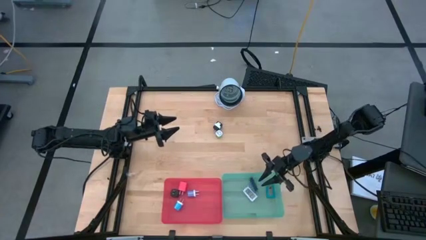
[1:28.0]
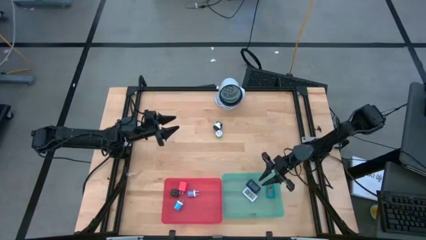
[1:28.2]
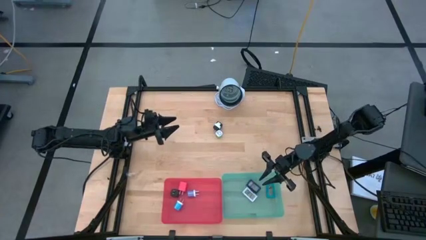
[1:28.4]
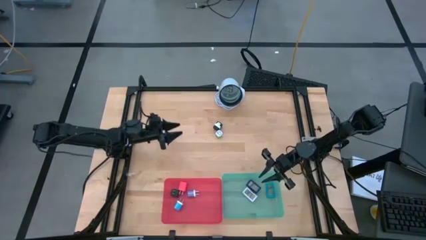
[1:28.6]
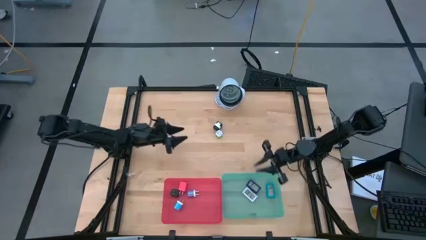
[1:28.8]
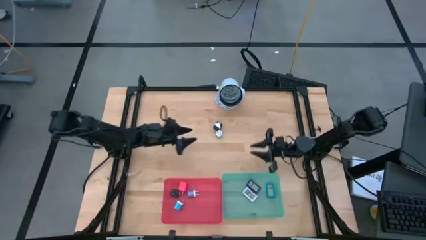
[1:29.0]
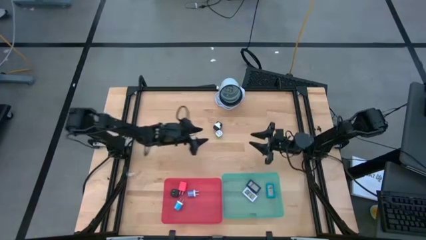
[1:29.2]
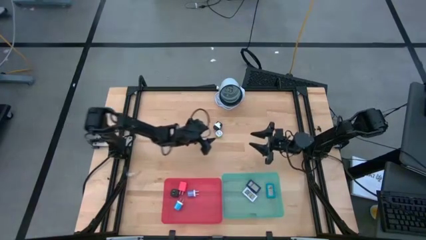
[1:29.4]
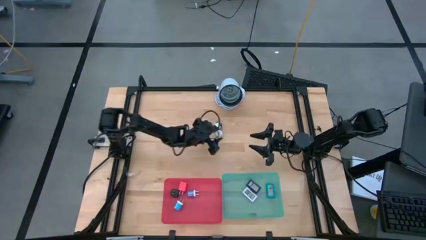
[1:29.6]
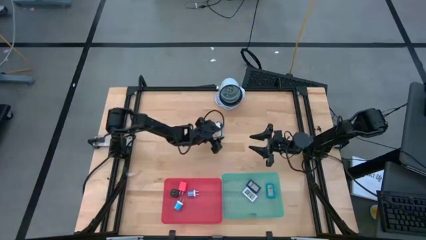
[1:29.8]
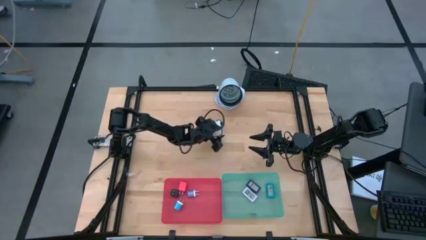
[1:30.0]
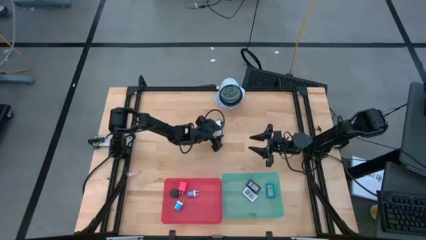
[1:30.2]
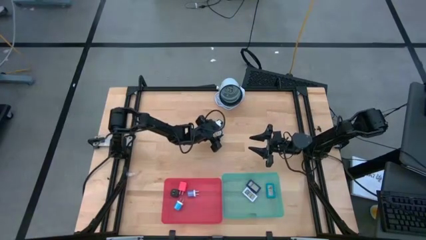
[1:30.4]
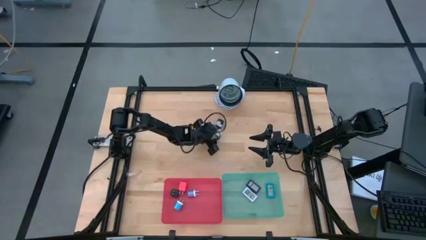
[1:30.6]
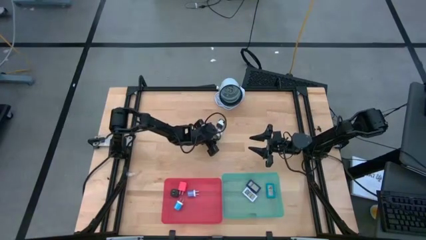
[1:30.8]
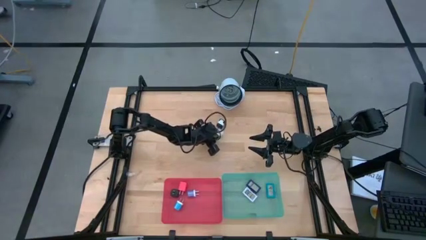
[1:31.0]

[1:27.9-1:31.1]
Task: Pick & Place Office items
Put the green charger adapter into the red bin

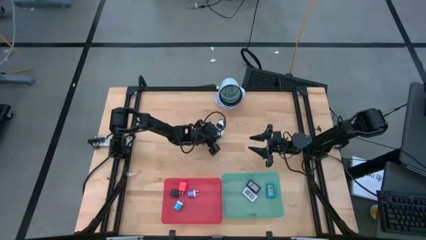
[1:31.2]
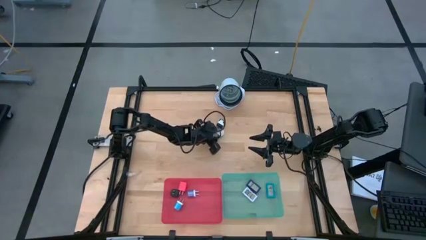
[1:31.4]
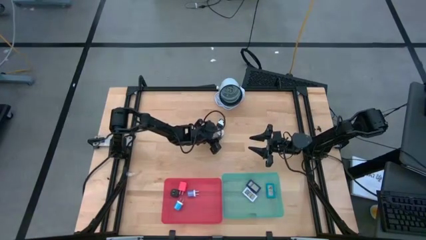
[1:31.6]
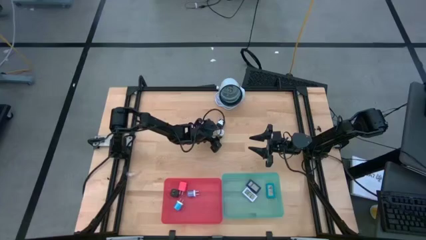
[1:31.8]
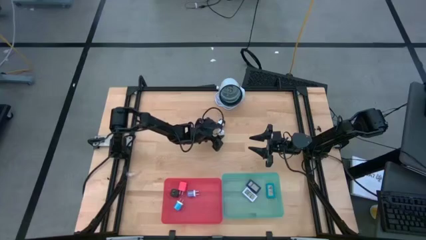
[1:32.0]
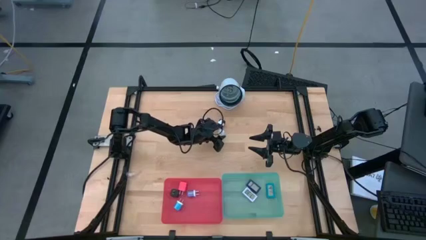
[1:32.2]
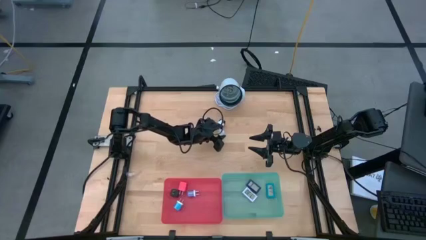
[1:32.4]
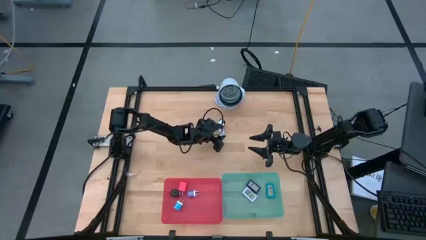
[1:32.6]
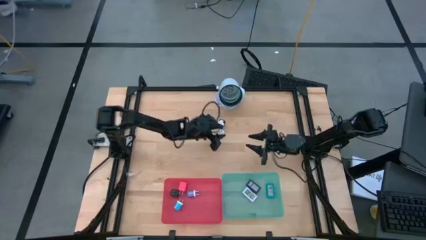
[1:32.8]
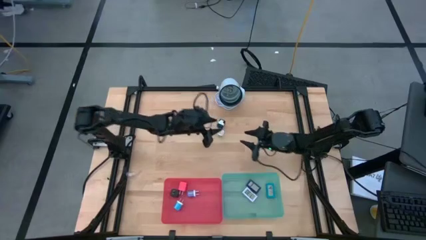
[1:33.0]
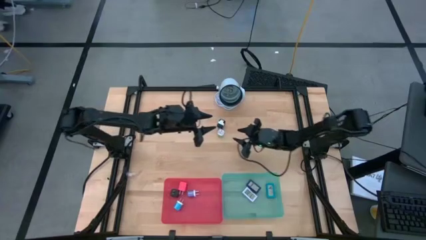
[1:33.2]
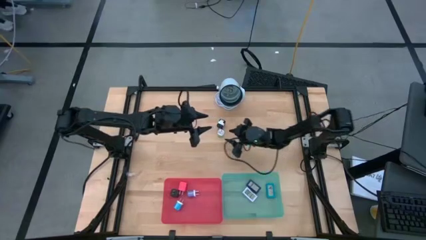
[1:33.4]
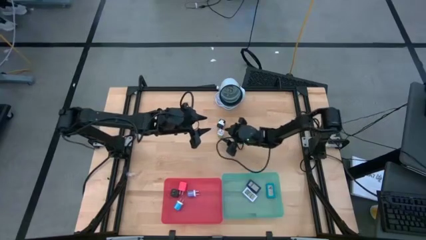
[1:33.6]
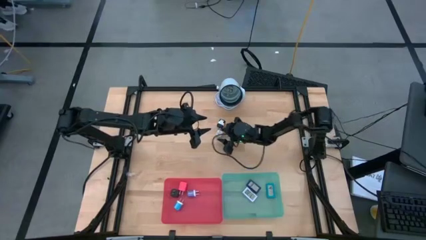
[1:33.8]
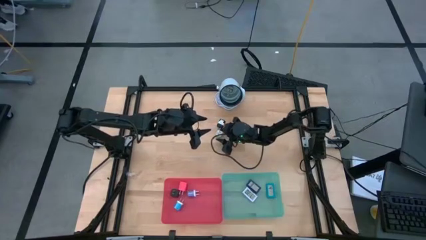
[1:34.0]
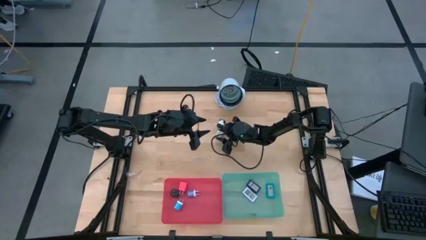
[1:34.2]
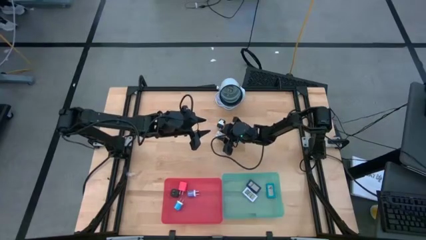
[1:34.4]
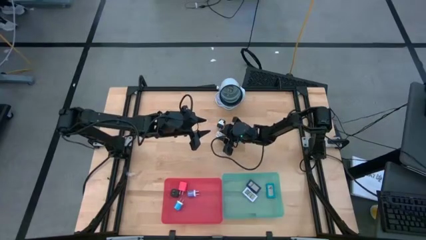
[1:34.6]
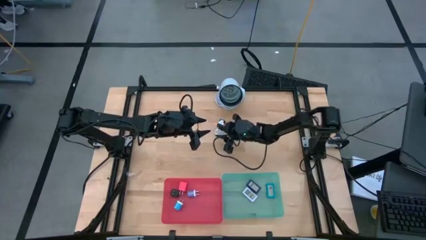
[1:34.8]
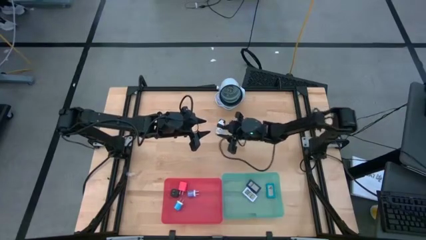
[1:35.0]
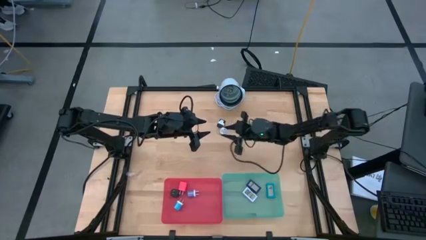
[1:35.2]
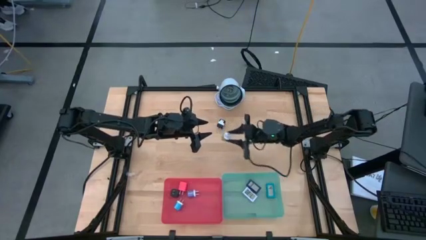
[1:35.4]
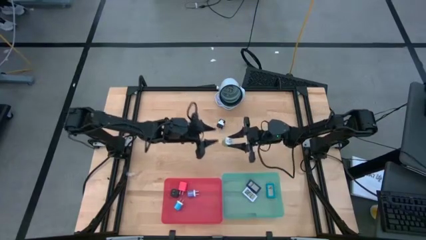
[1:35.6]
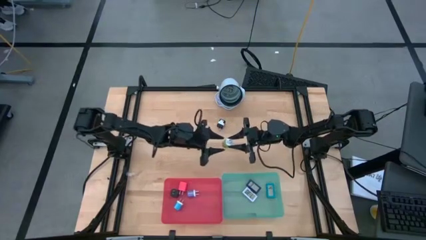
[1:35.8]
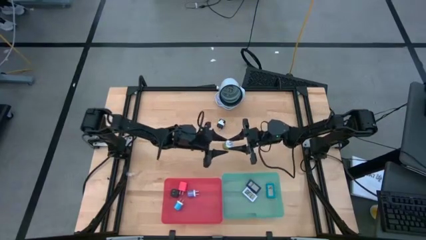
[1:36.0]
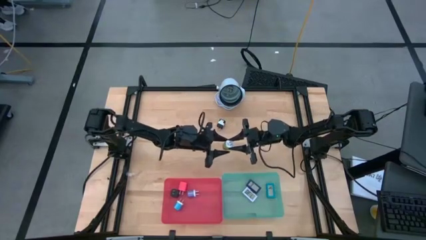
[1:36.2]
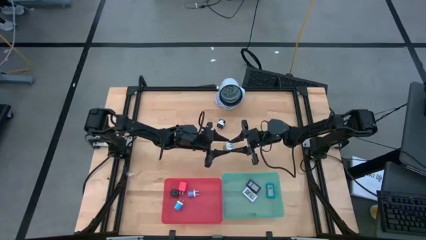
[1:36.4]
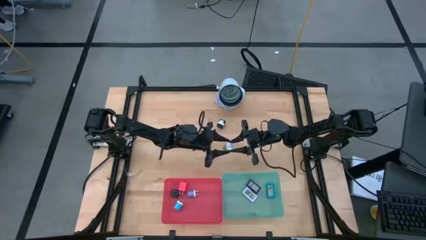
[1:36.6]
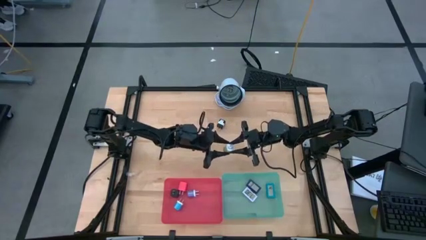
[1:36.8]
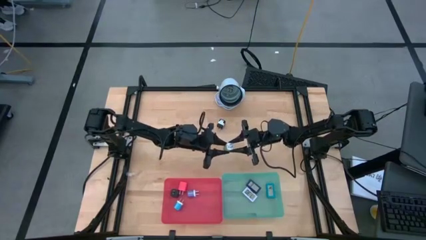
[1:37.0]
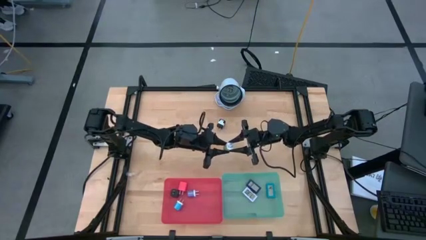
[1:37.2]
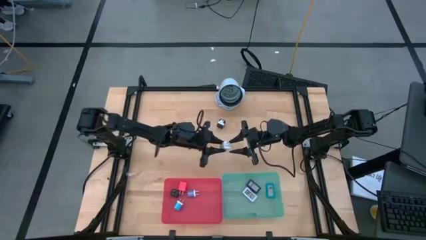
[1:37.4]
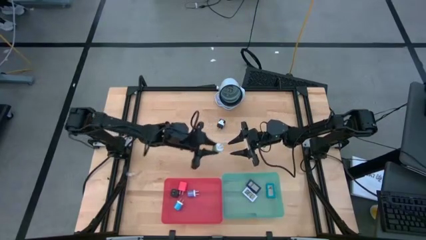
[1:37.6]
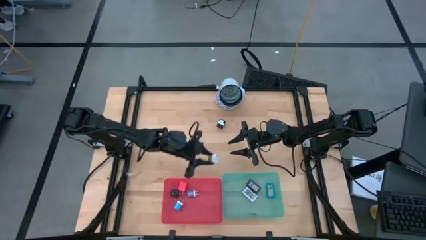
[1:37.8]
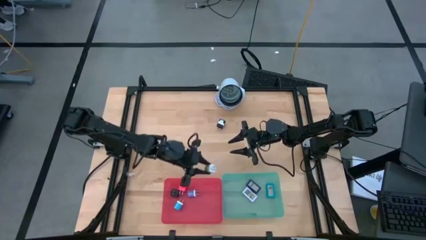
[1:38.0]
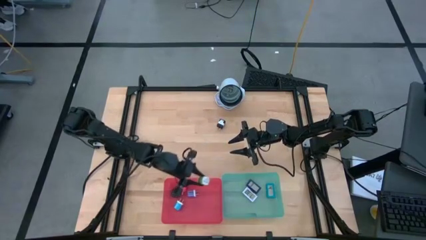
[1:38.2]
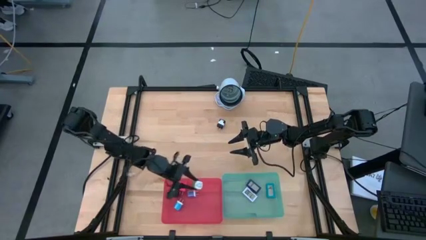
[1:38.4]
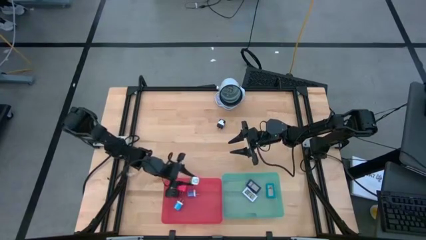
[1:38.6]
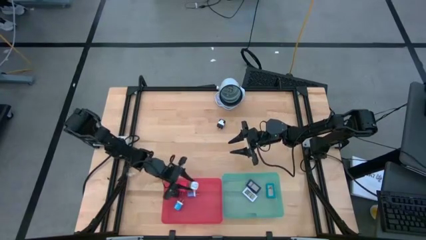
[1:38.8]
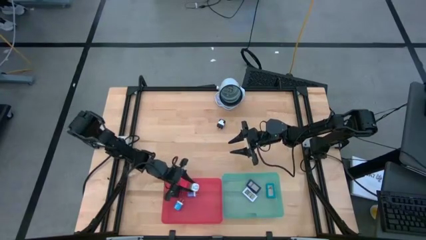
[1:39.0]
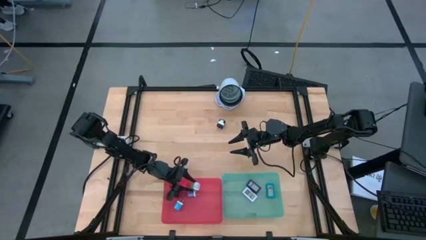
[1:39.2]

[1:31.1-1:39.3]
Put the green charger adapter into the red bin

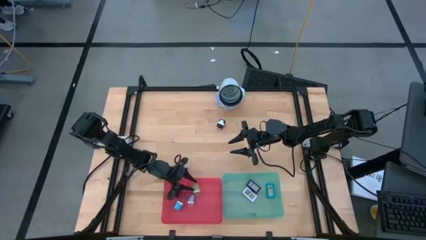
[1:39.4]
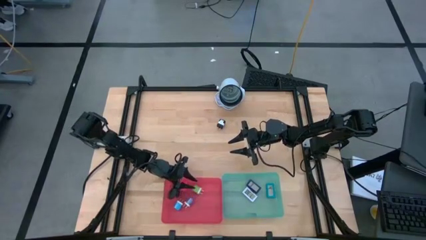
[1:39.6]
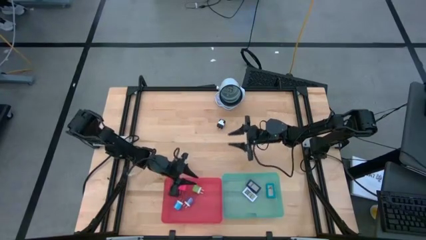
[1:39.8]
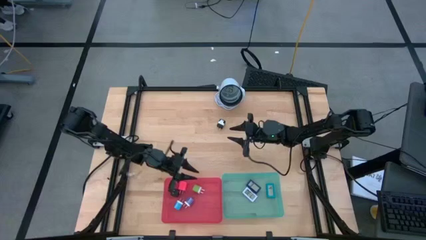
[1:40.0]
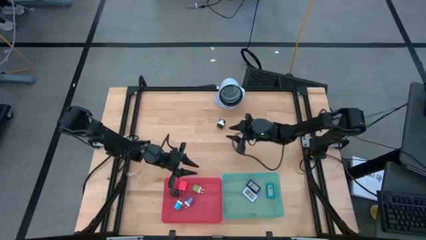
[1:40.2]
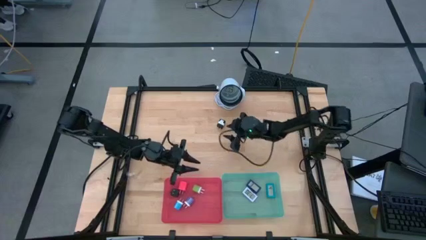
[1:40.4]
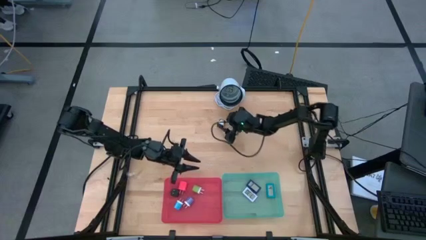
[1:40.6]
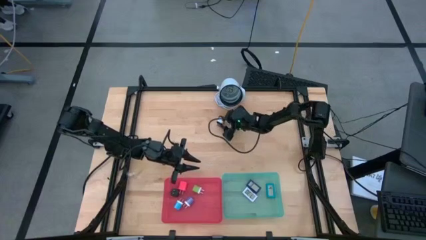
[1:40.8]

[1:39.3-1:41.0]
Put the black charger adapter into the red bin
